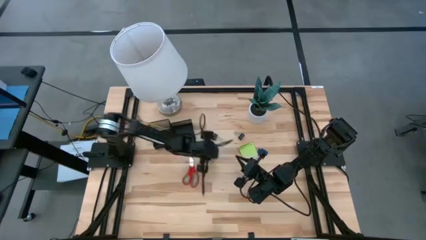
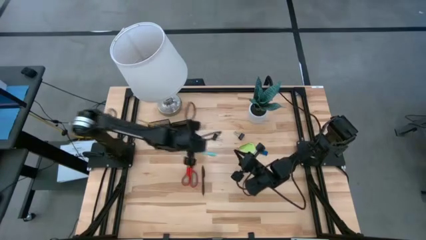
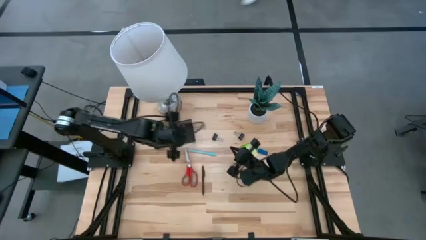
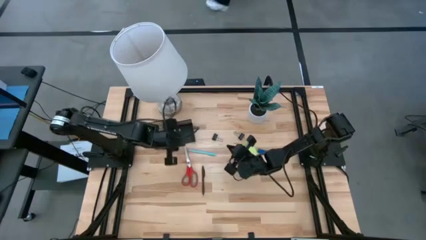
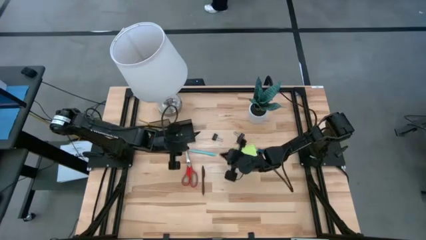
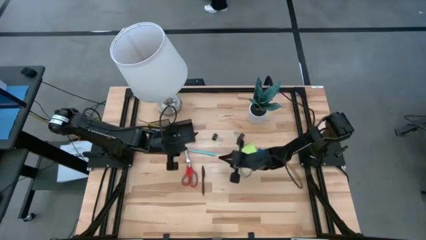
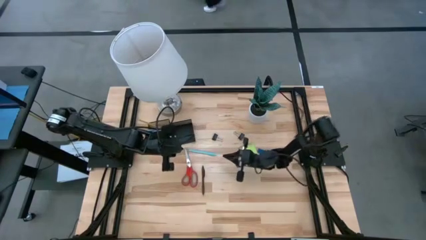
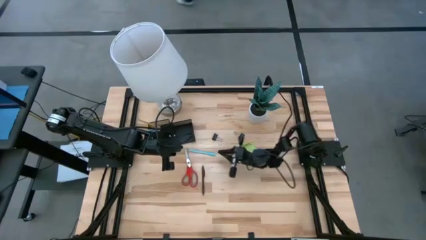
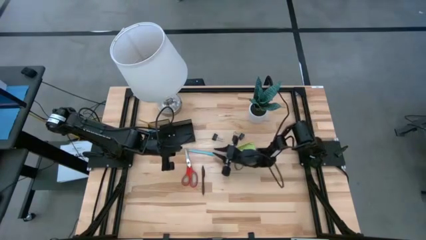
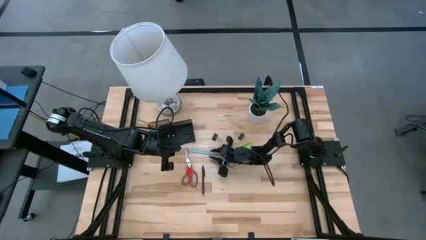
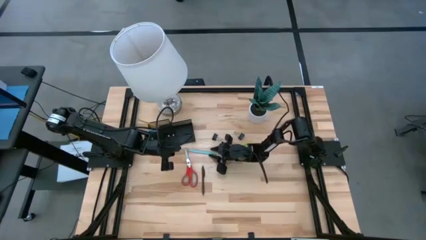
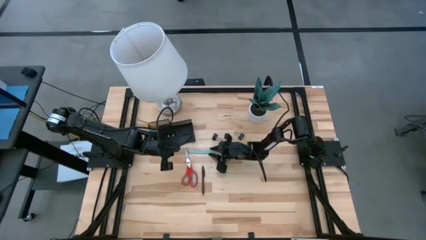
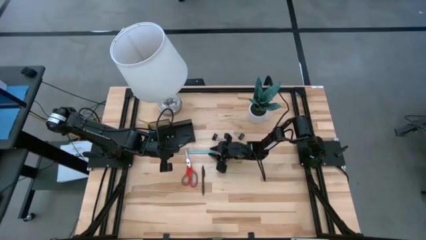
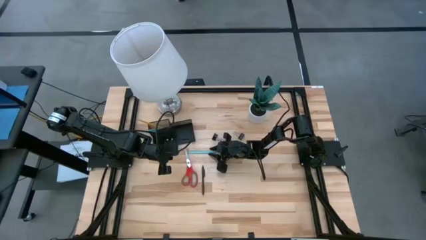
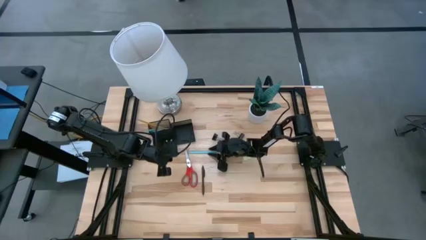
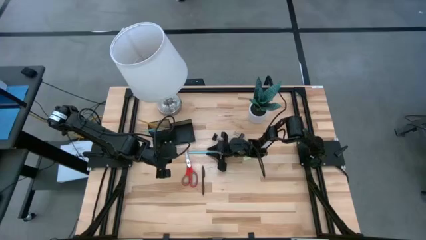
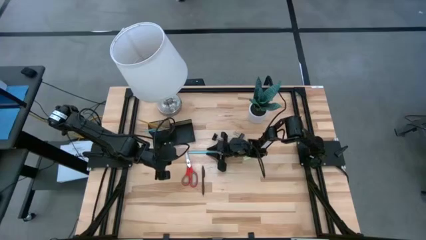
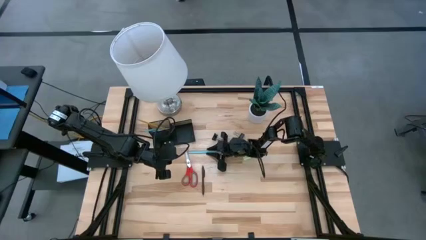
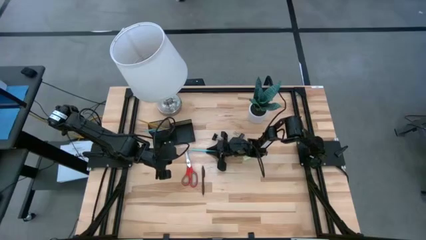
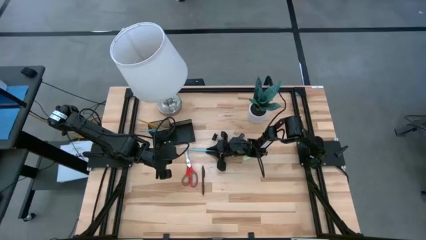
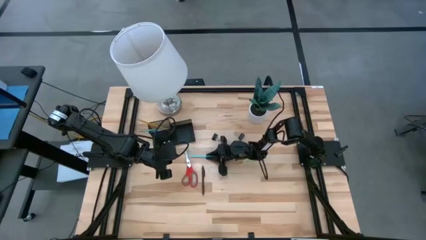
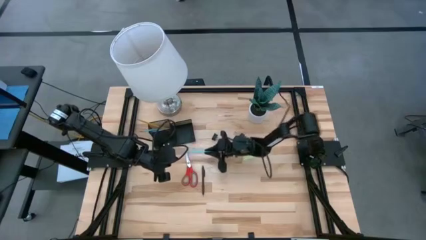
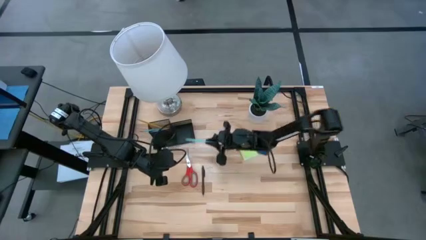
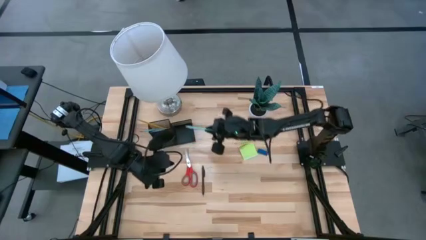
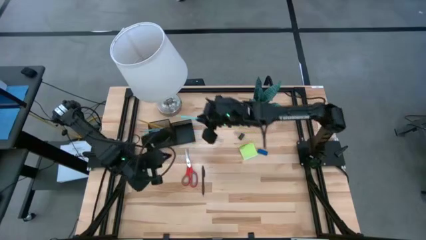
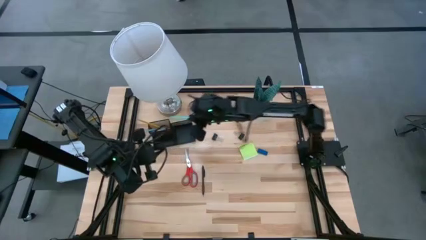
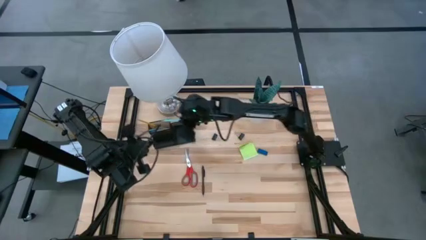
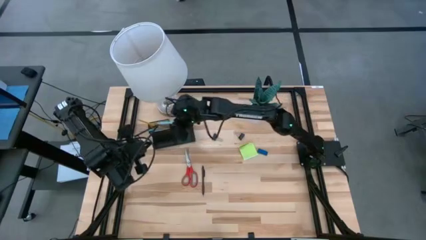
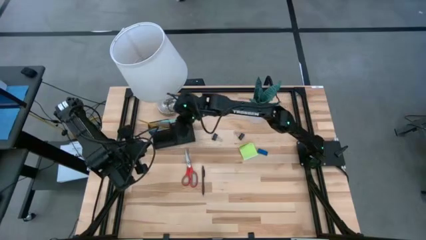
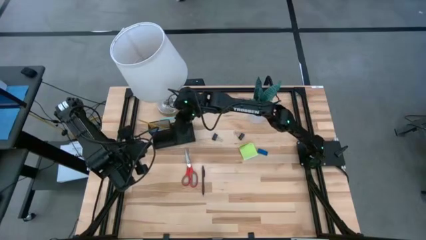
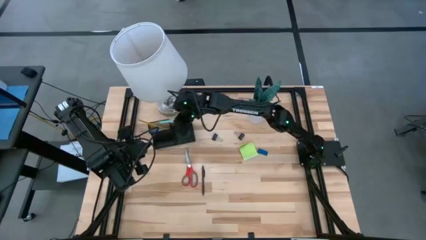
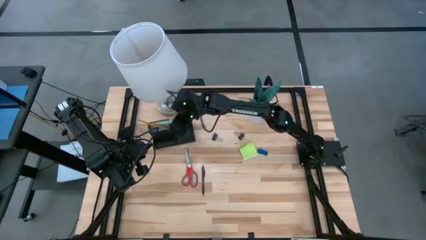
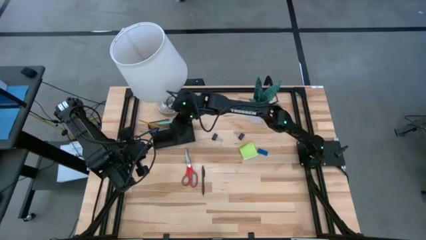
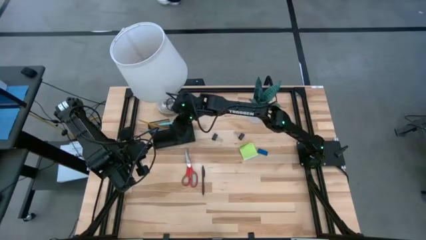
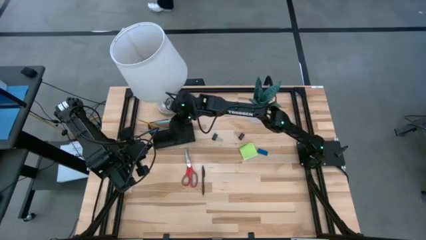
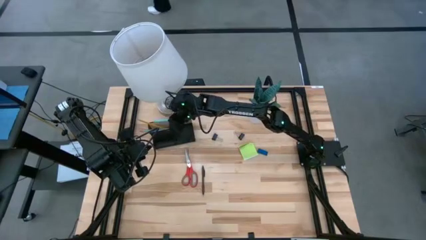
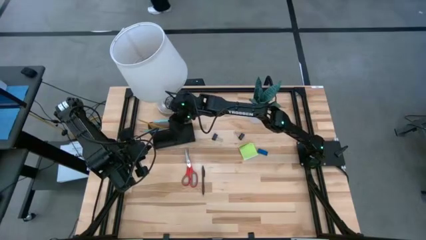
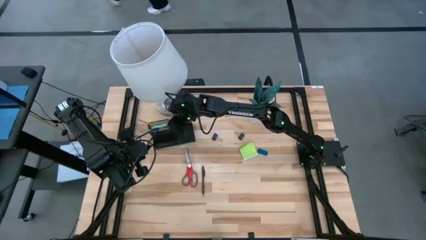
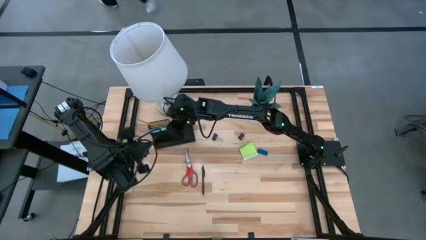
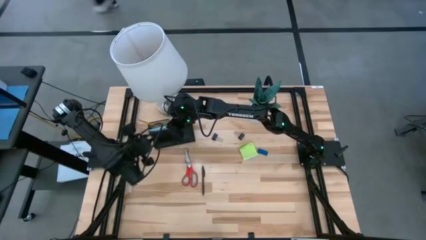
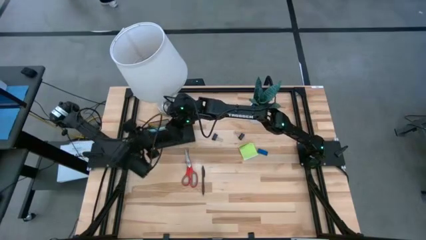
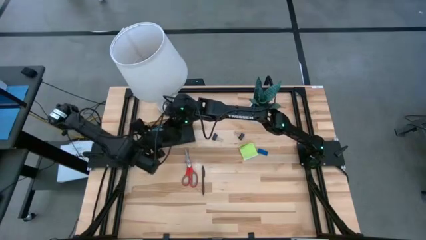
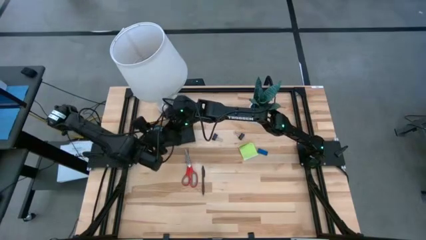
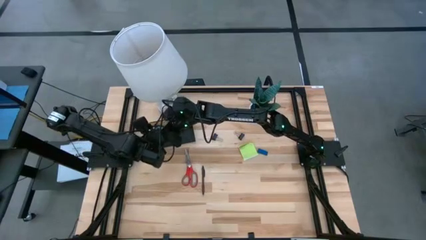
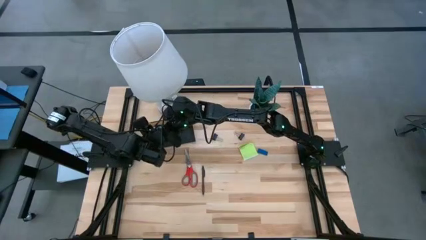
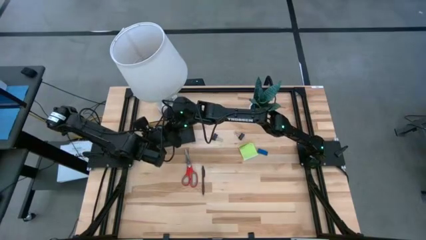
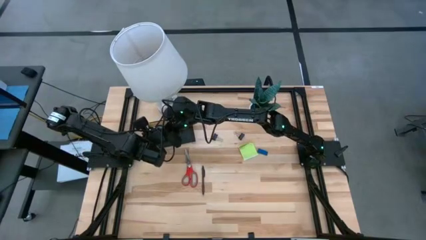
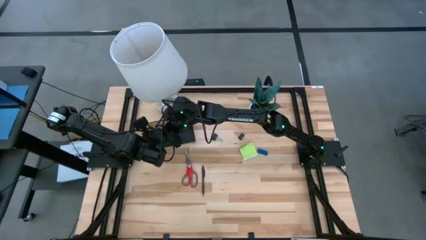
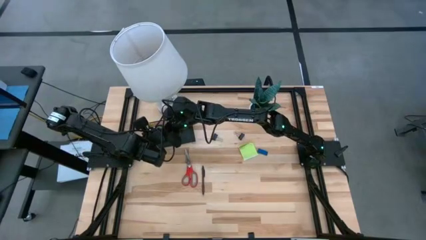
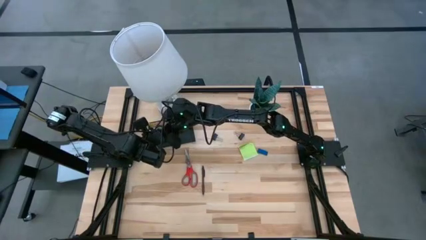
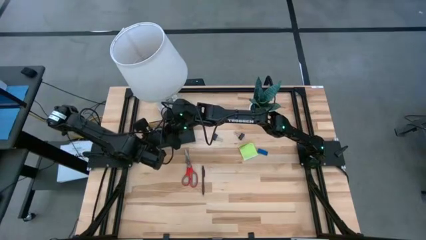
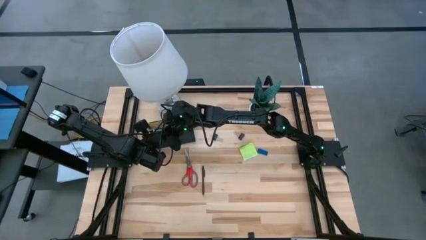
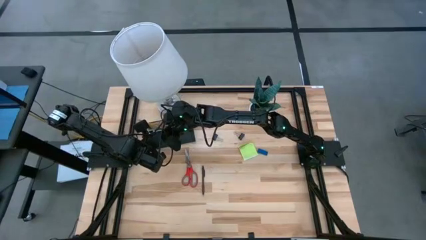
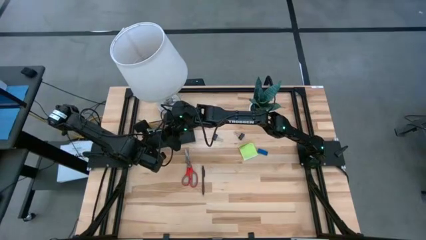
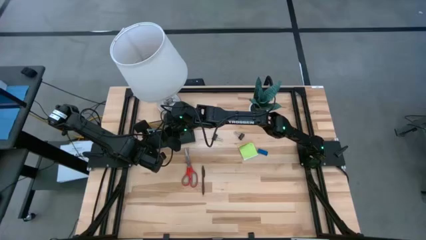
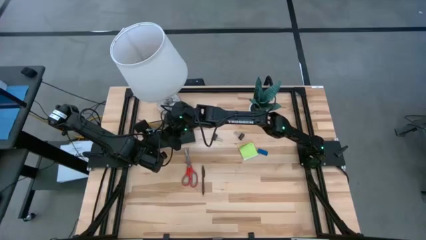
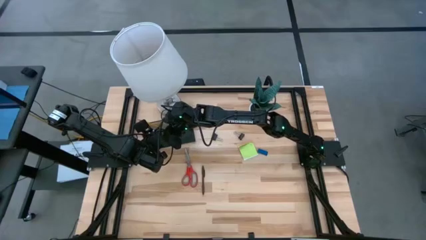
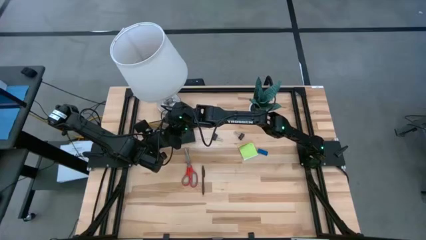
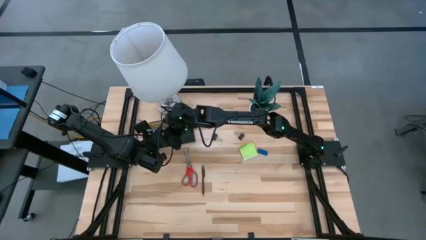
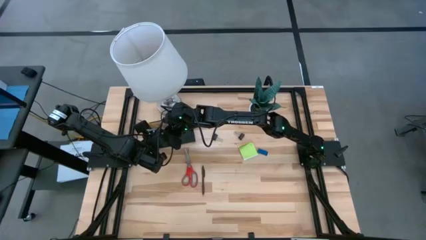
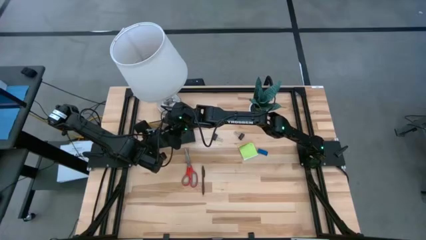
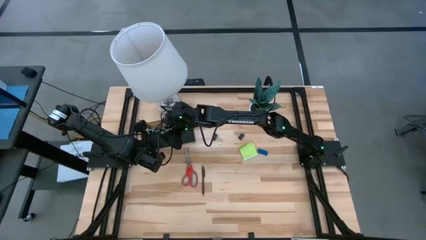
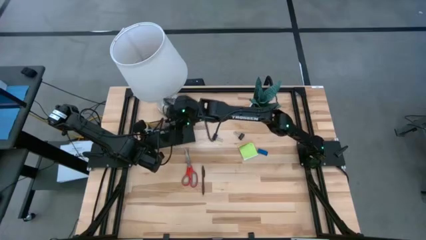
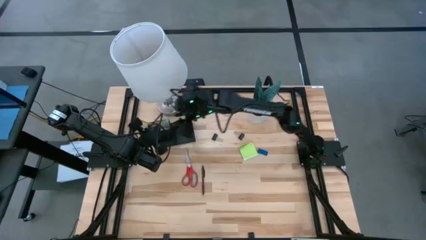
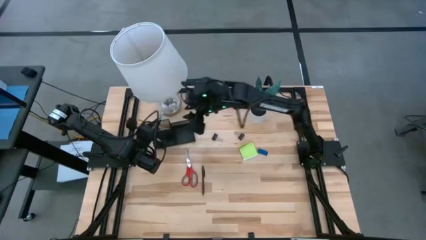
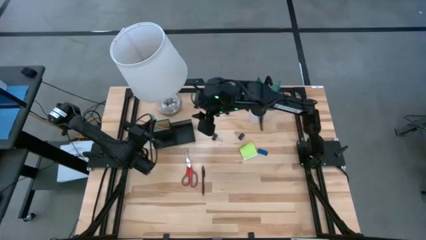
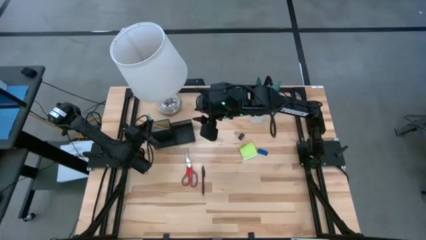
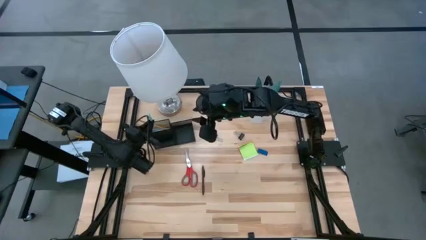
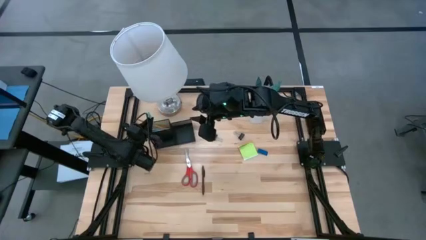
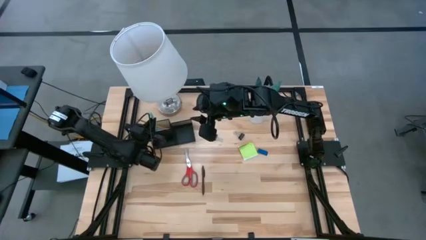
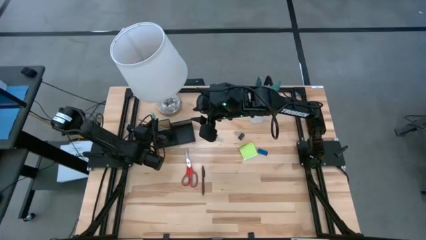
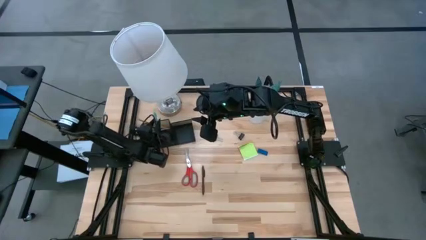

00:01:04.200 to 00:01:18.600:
Task: Pick and place office supplies into organizer
Put the blue pen into the black desk organizer

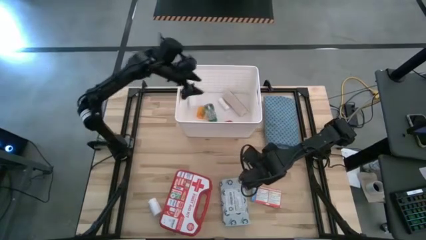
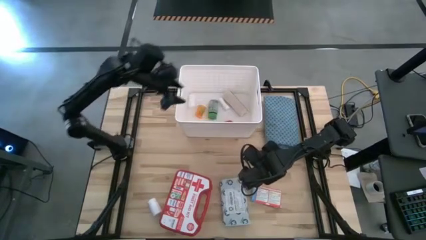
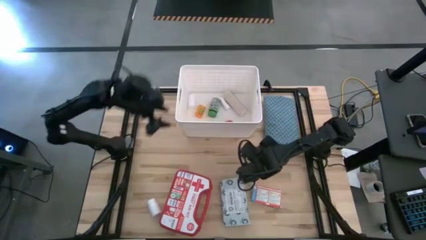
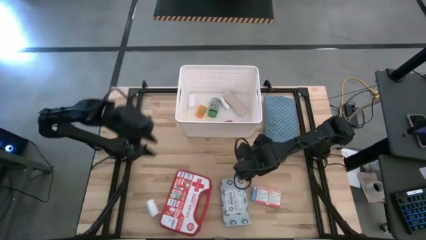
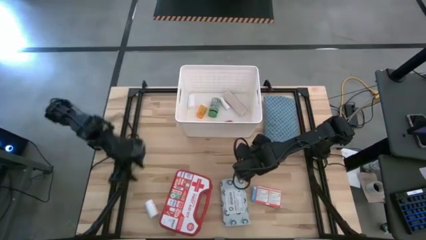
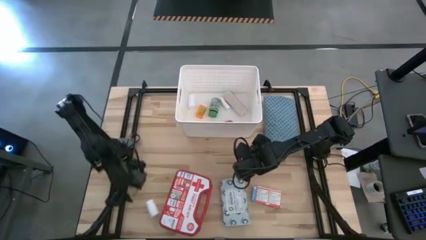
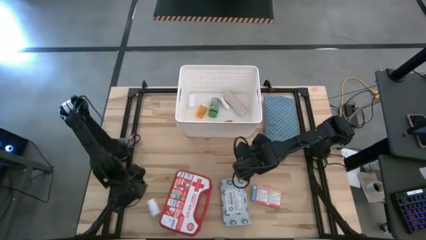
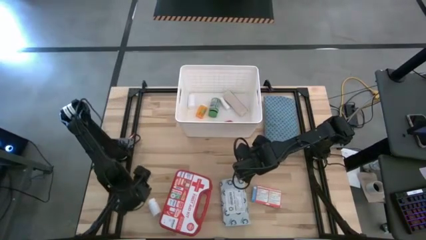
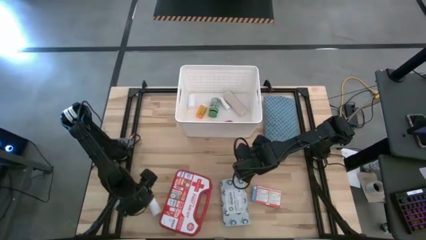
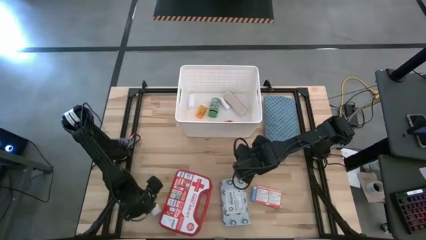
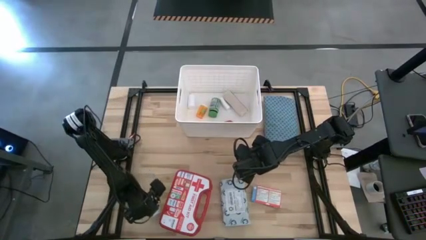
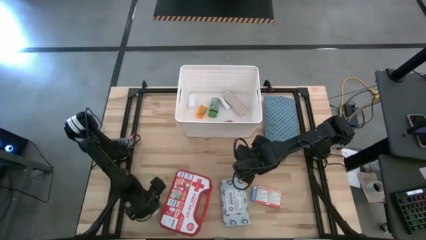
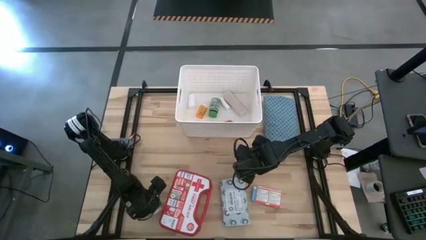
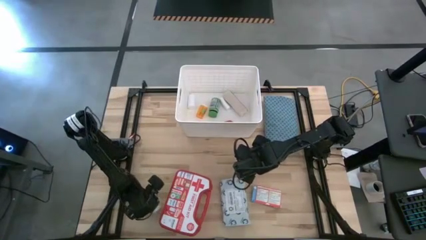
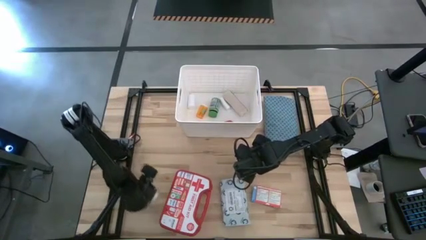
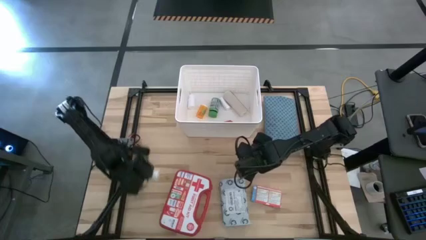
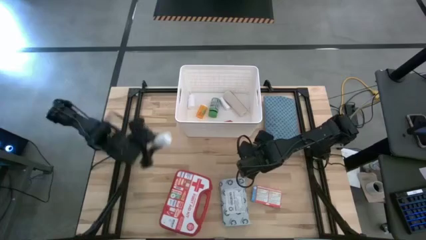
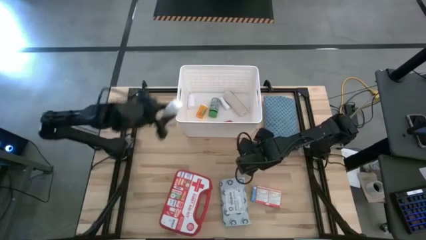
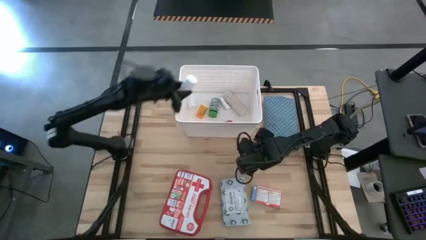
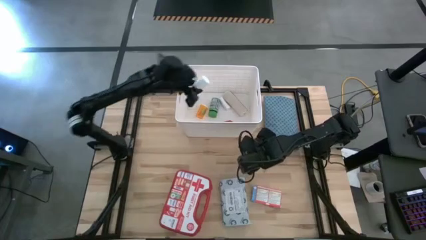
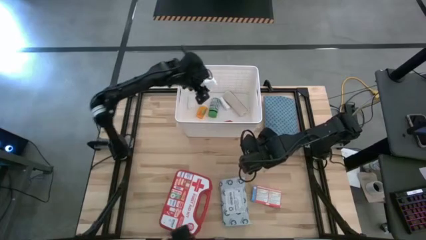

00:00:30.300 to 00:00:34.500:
Task: Pick & place medical supplies in basket/bin
Put the white pill bottle into the white bin
